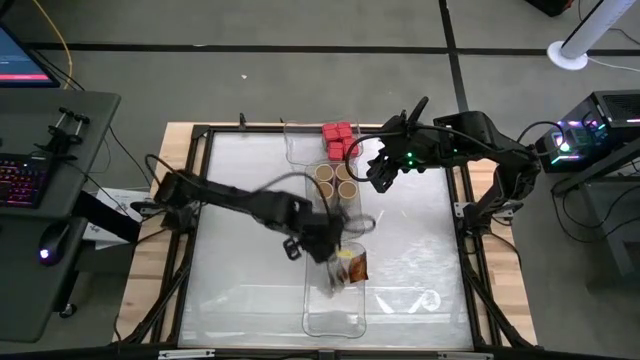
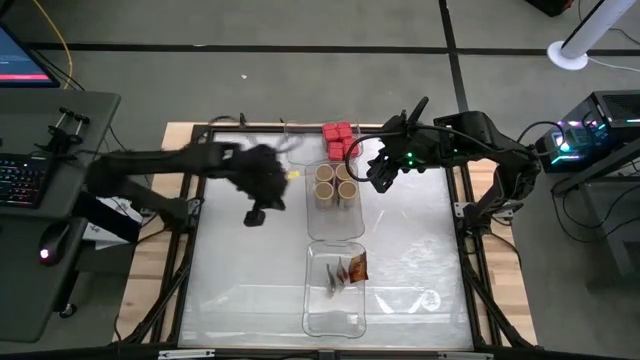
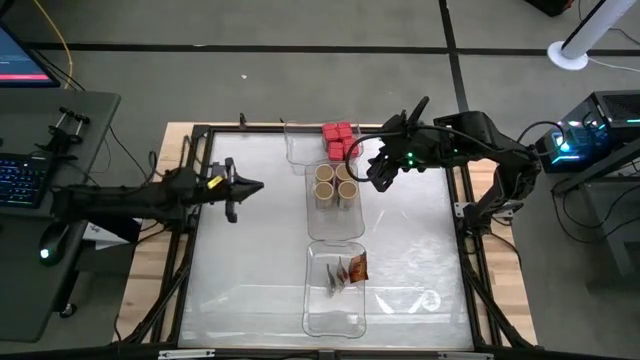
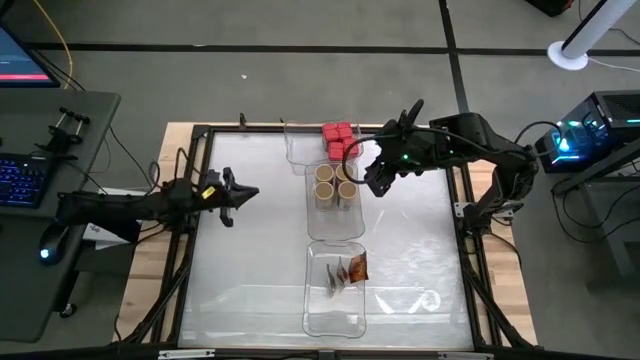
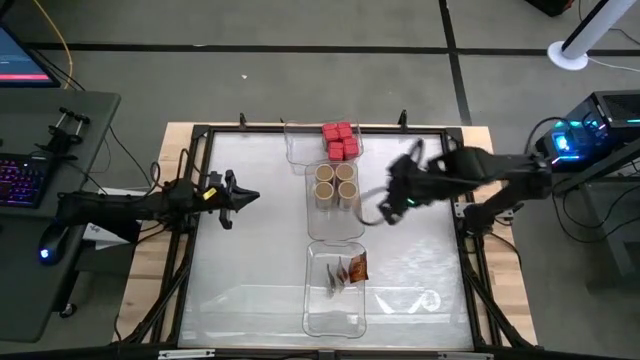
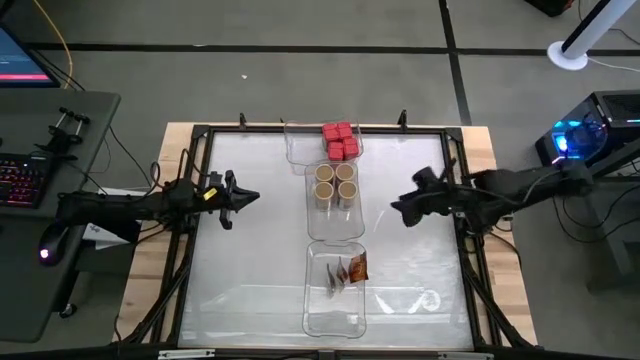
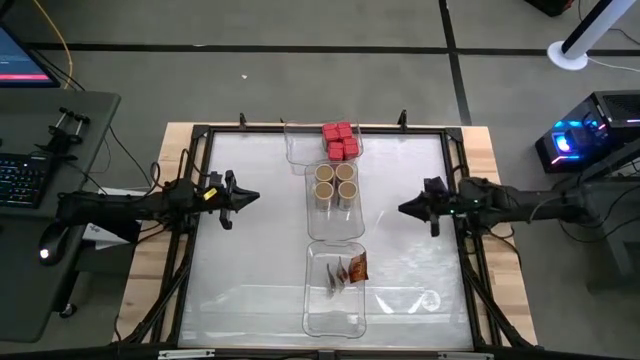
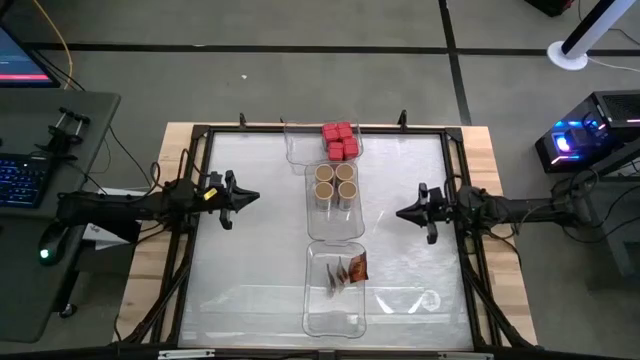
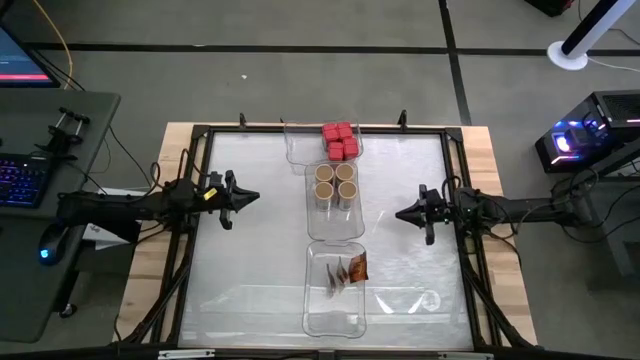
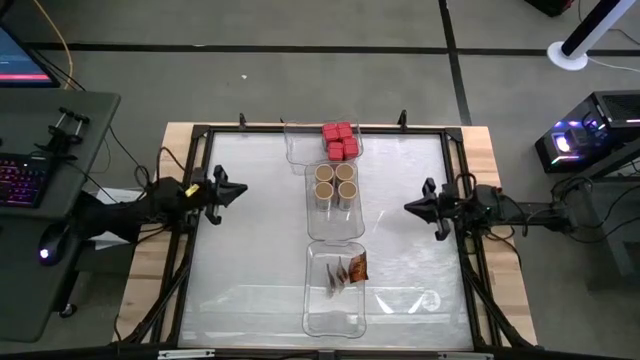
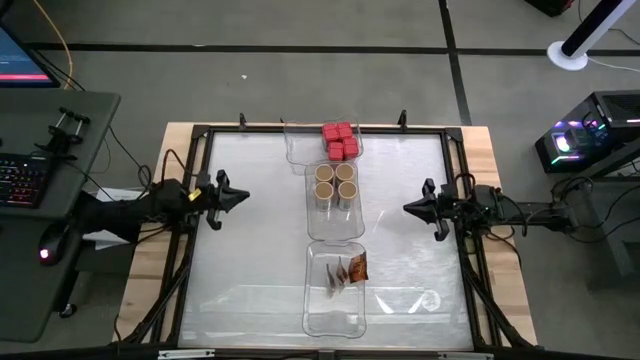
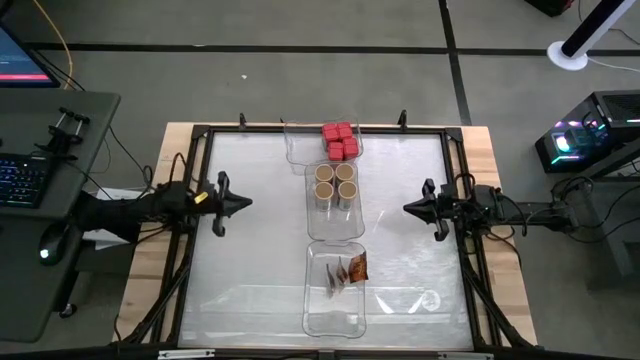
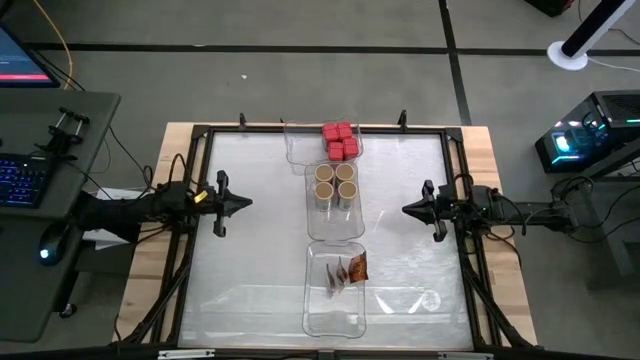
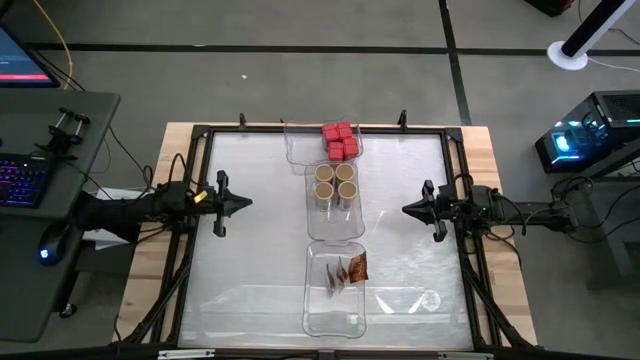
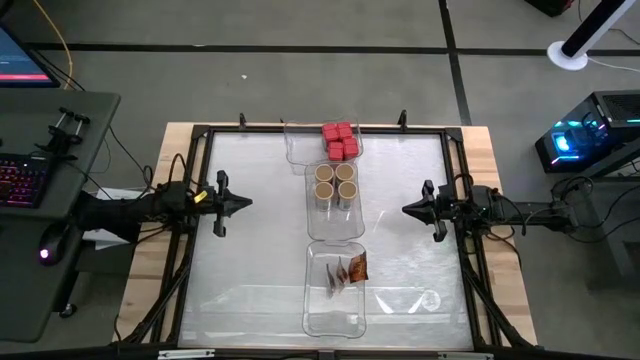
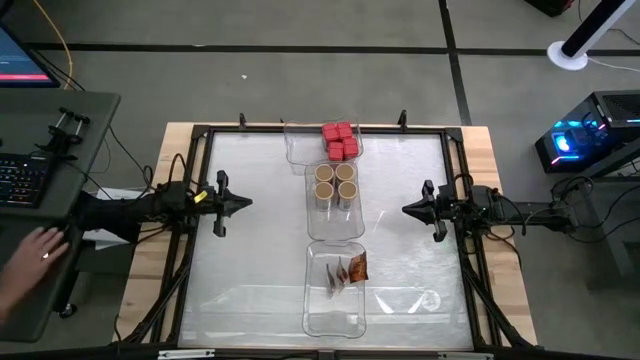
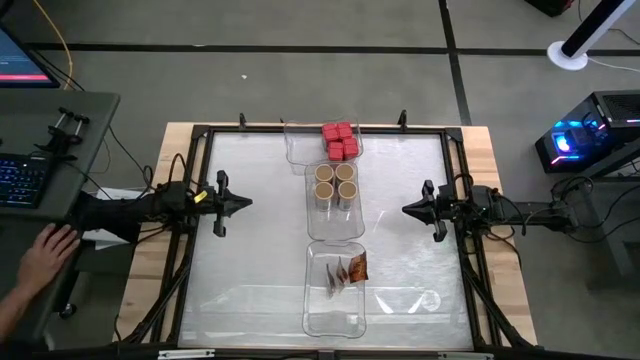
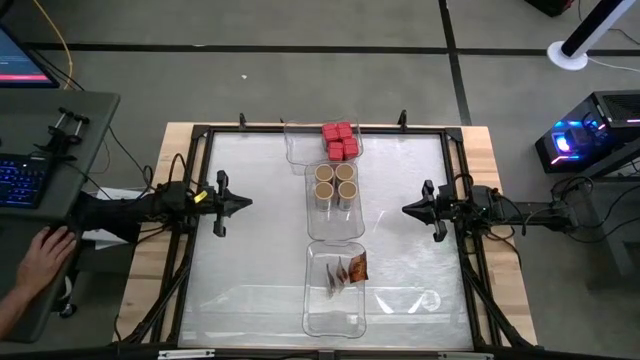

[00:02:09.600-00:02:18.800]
Task: Sort spices by type
Return to Home Position

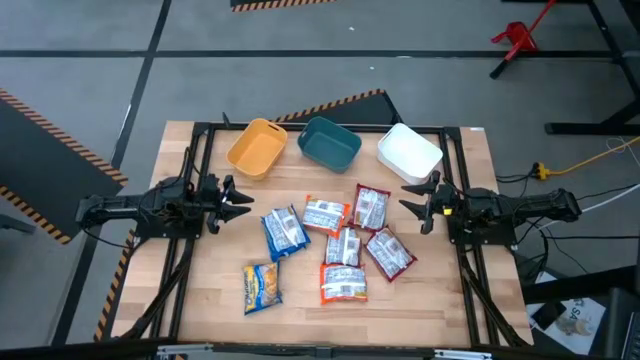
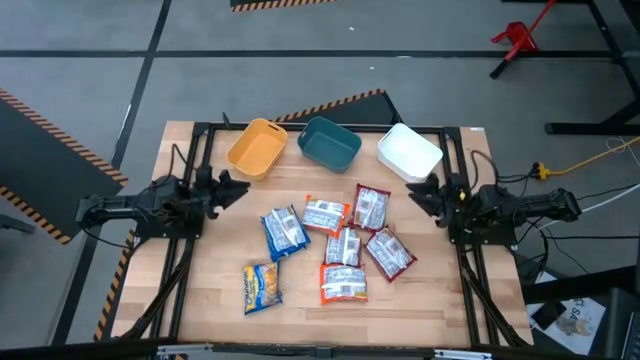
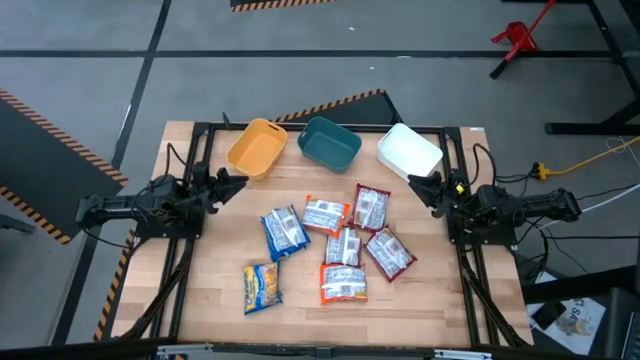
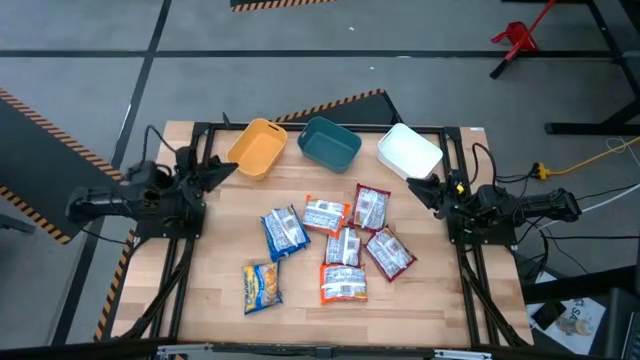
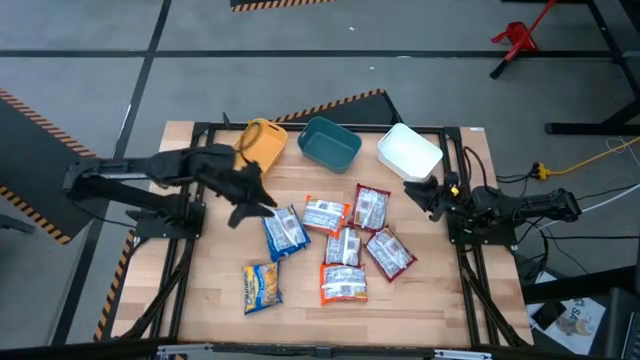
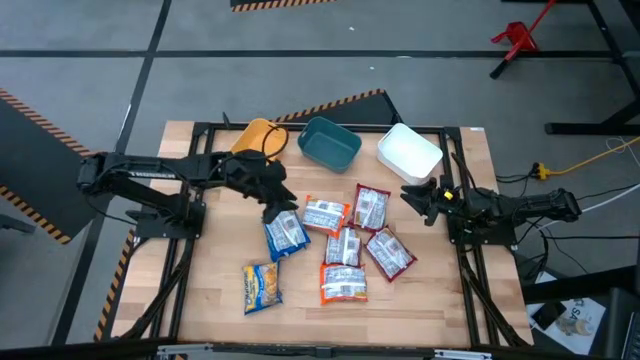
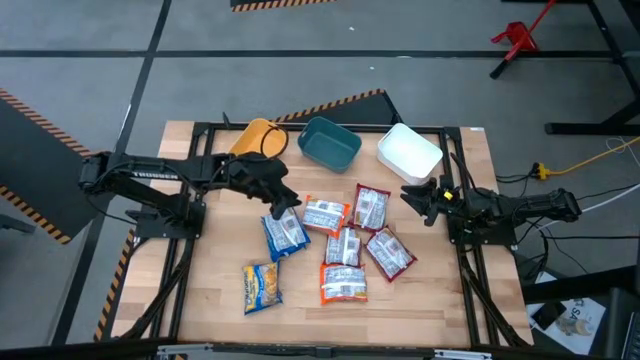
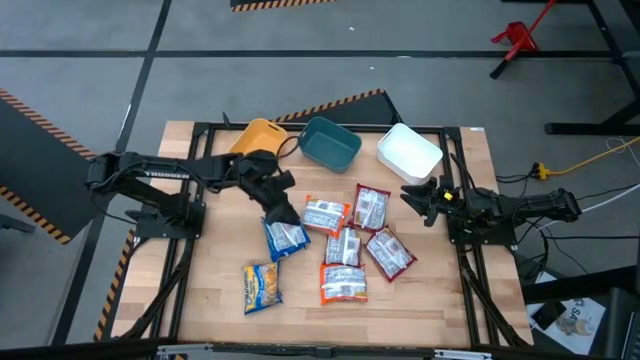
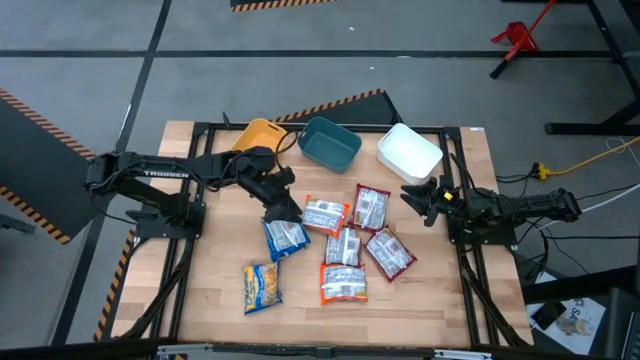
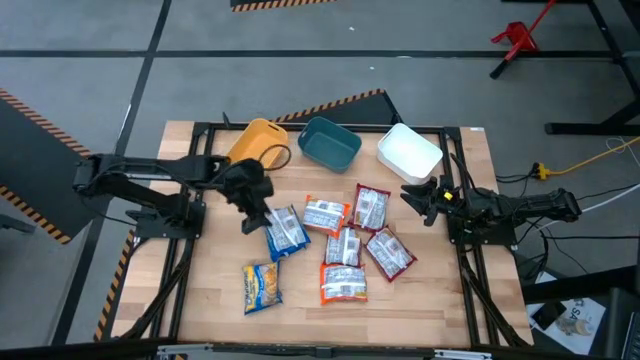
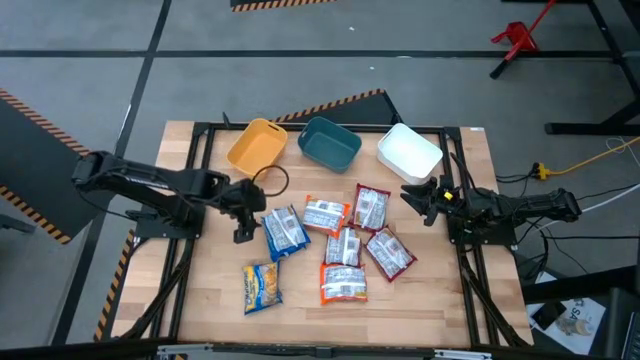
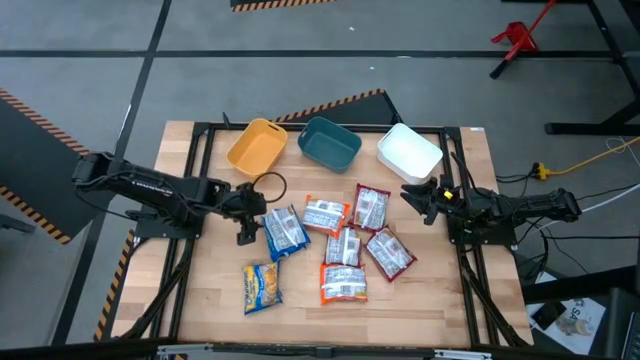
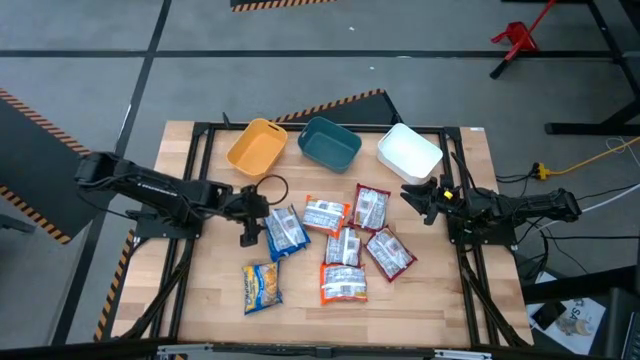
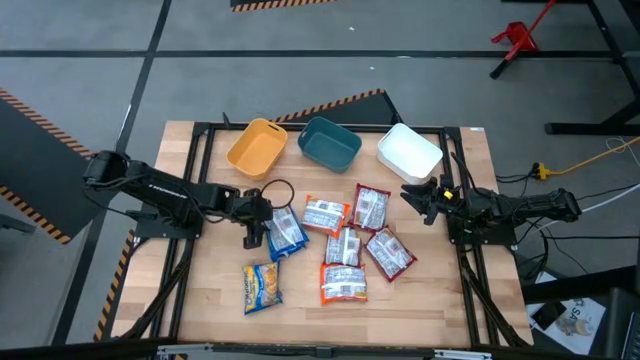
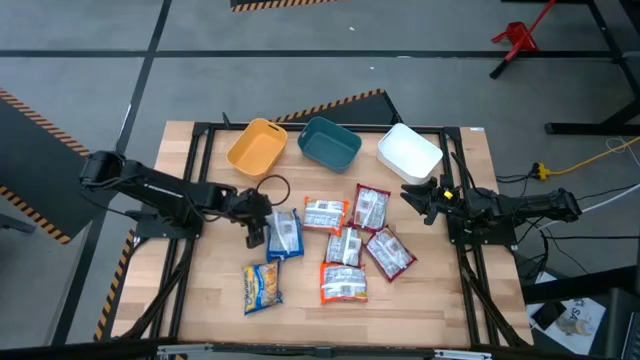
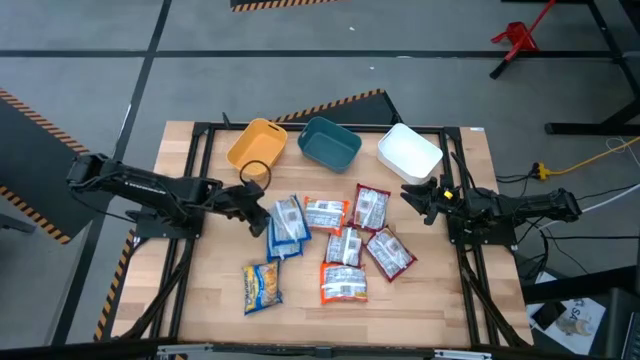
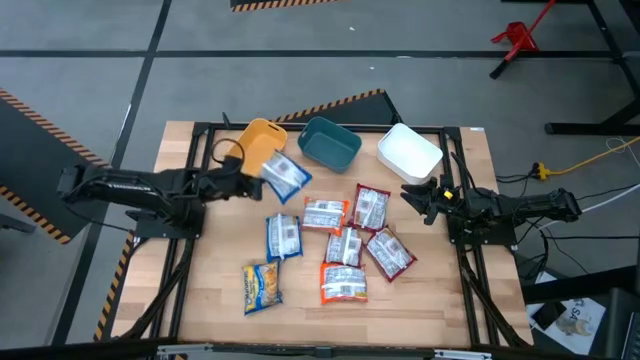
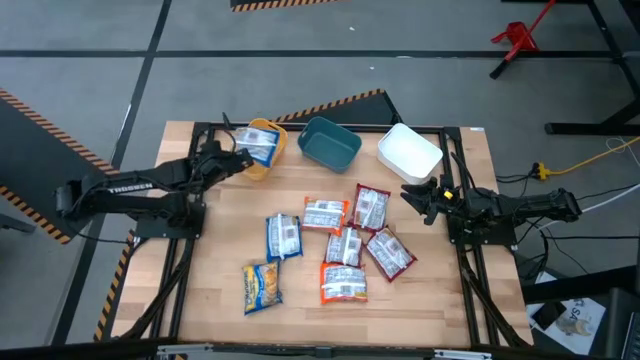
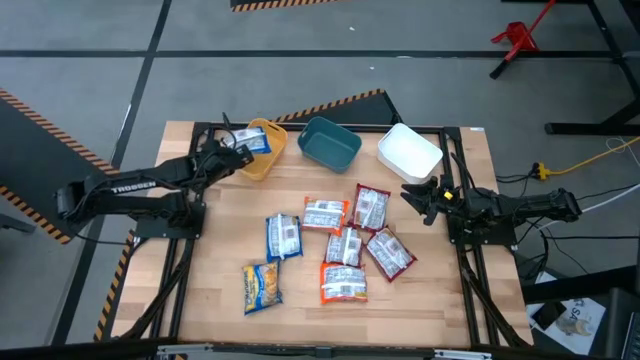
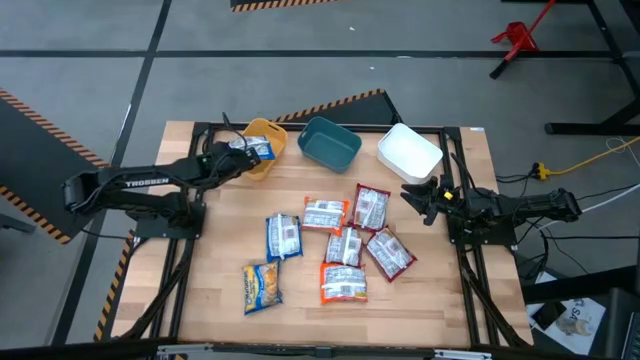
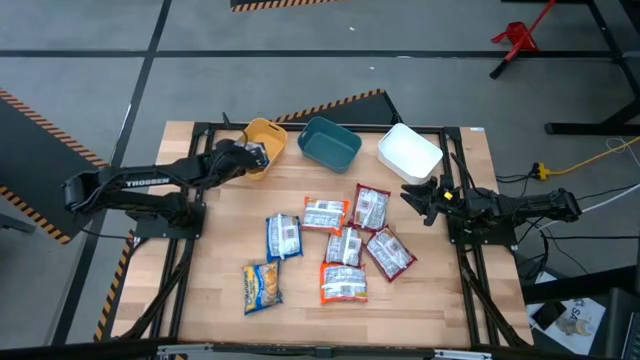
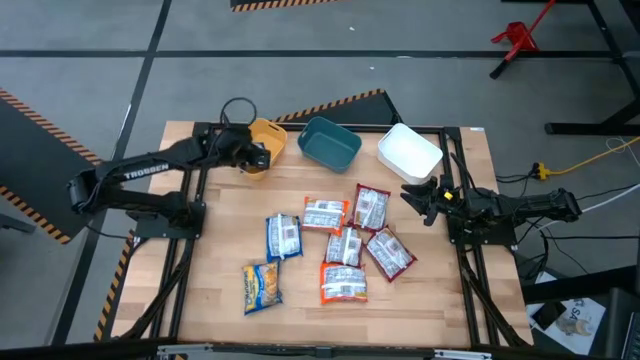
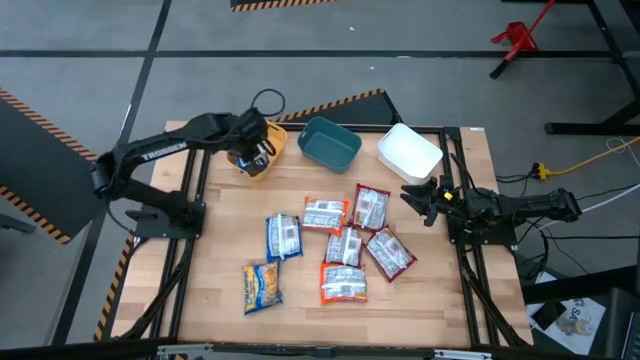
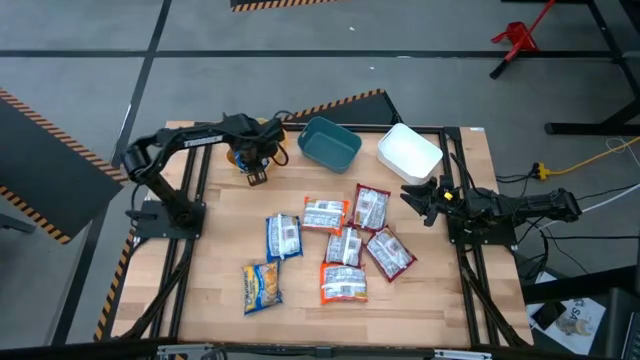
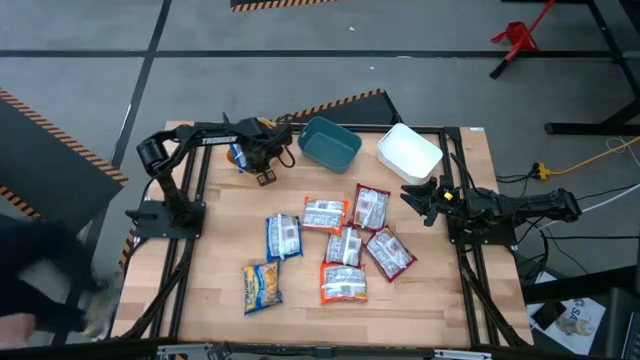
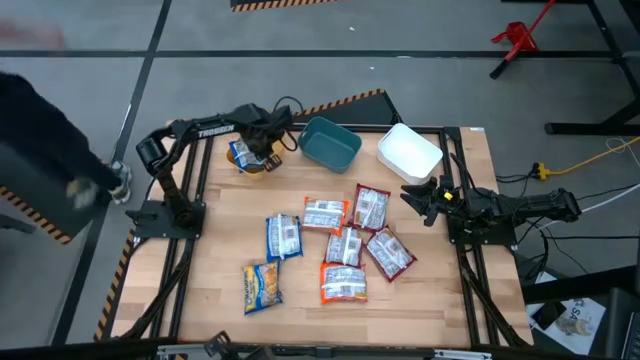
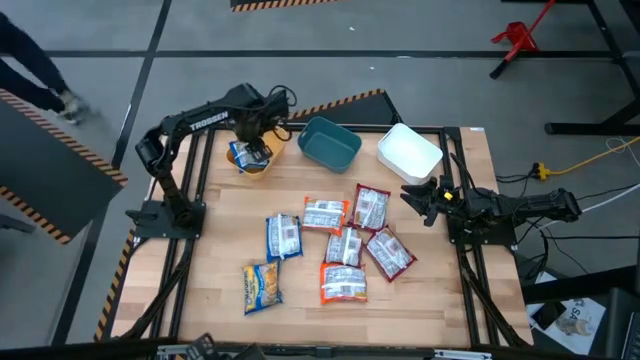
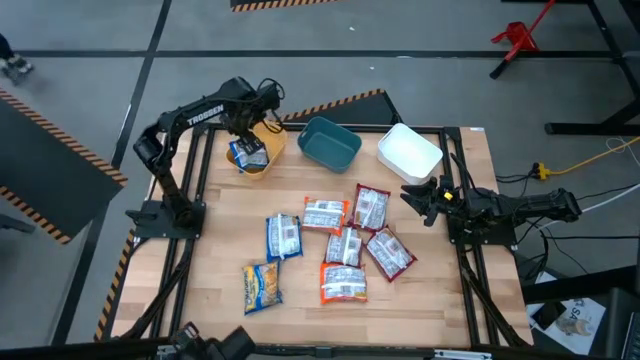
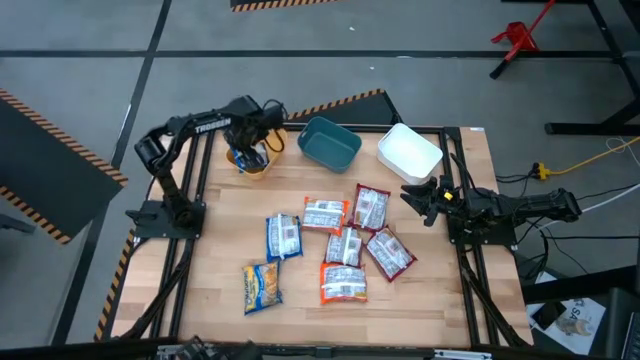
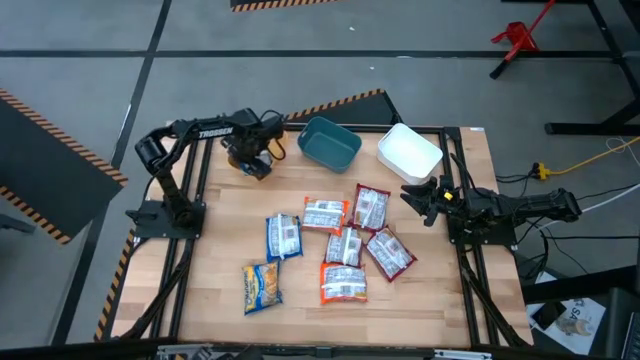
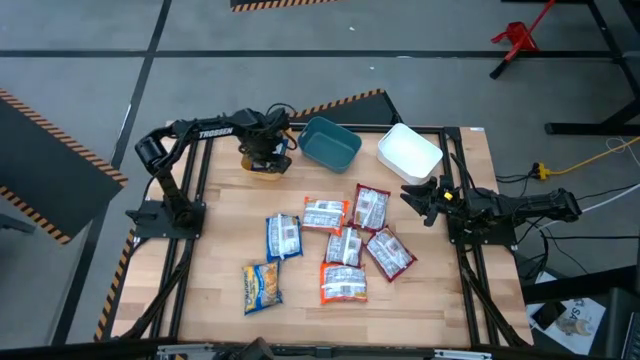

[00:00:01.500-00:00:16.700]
Task: Sort Maruchan noodles
Put the blue noodle pack into the yellow bin
